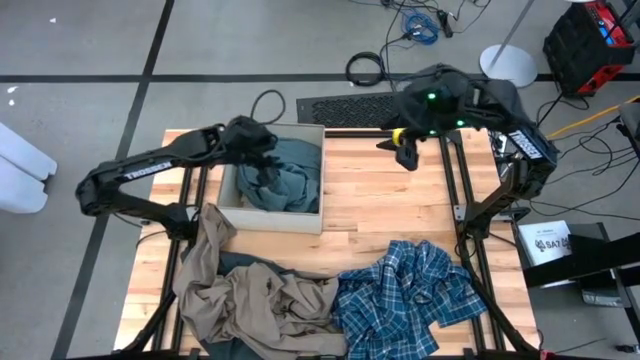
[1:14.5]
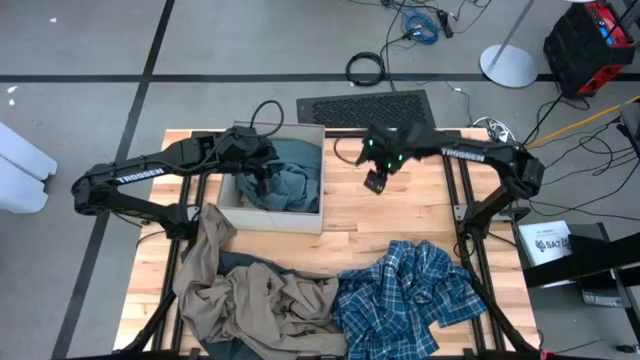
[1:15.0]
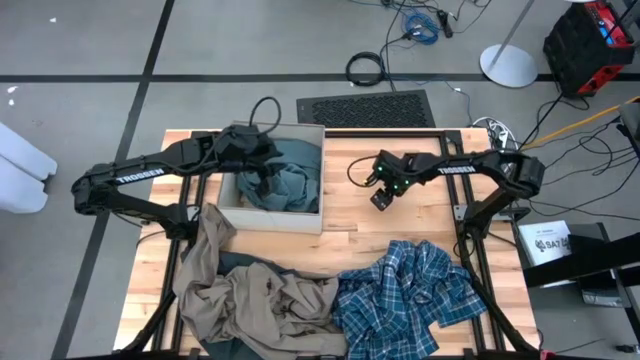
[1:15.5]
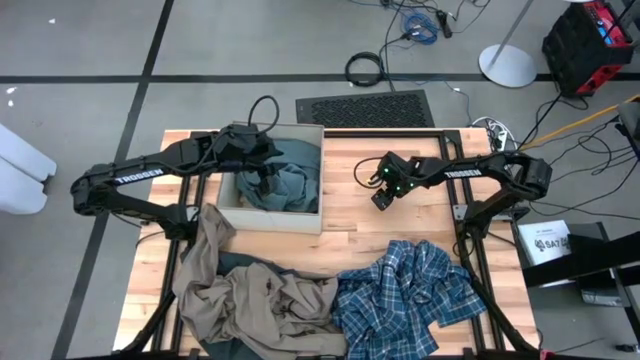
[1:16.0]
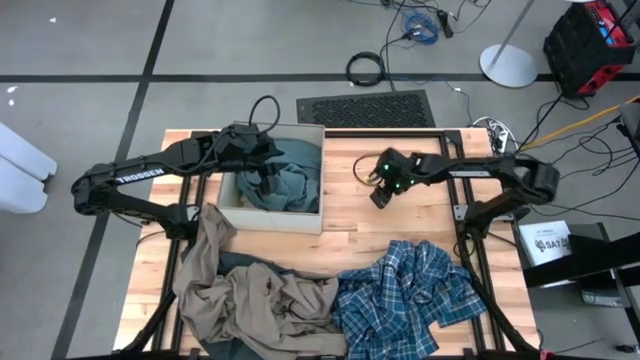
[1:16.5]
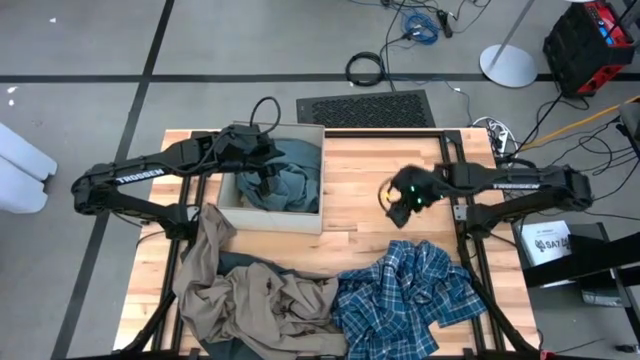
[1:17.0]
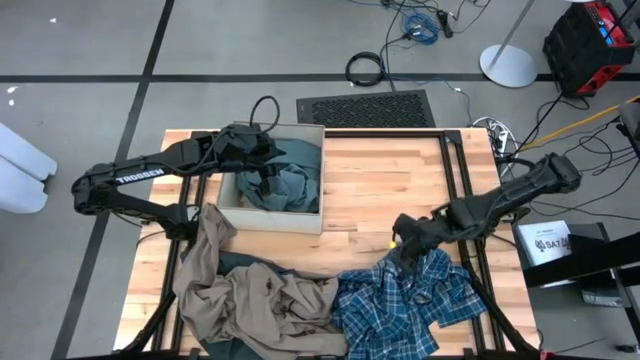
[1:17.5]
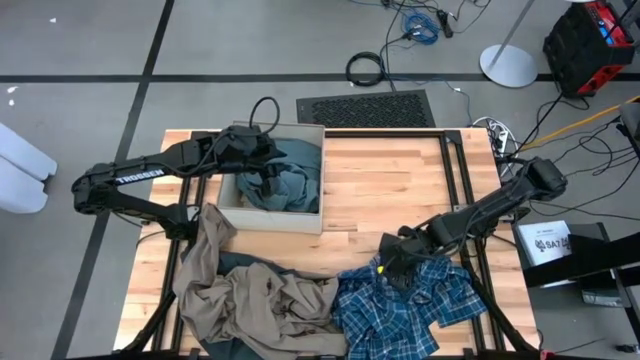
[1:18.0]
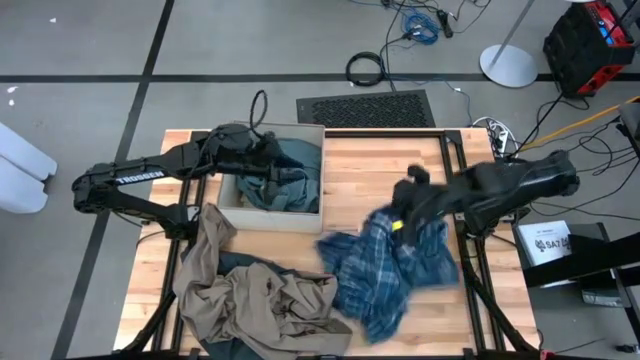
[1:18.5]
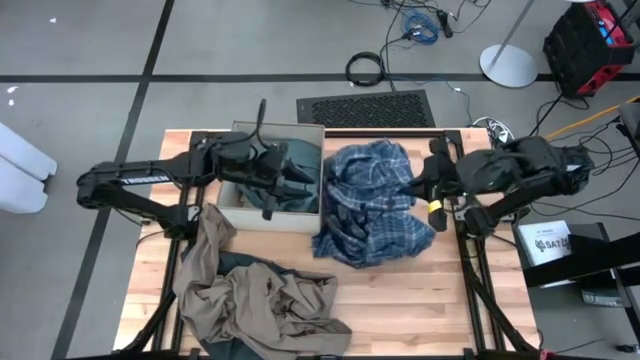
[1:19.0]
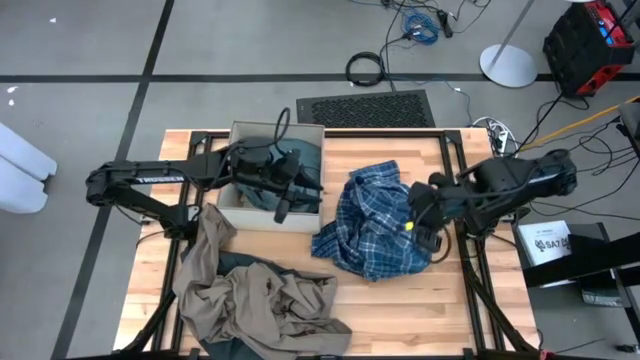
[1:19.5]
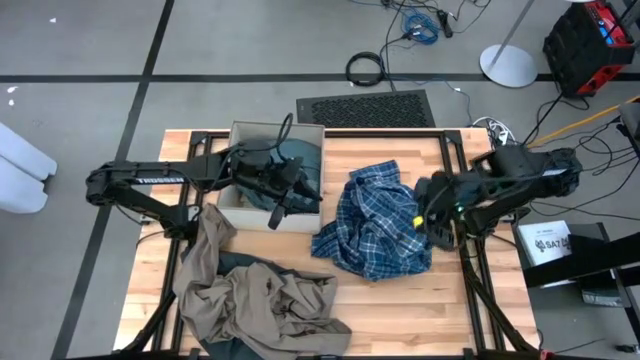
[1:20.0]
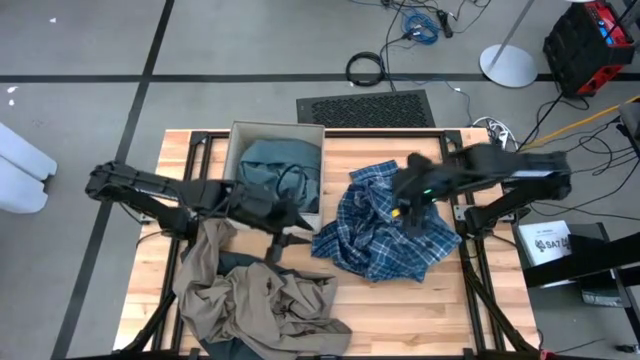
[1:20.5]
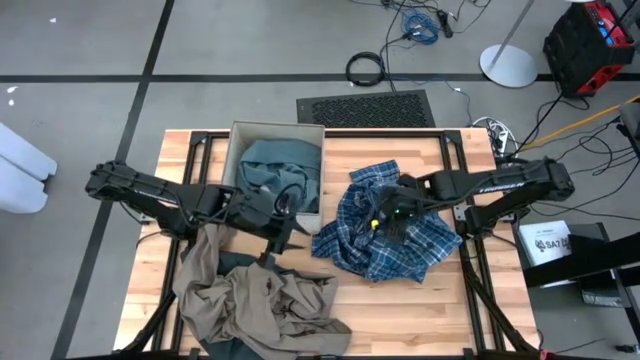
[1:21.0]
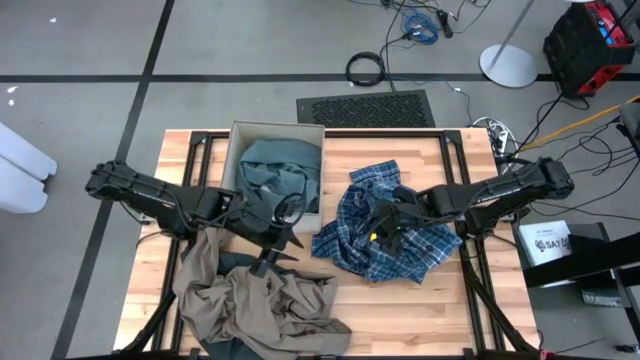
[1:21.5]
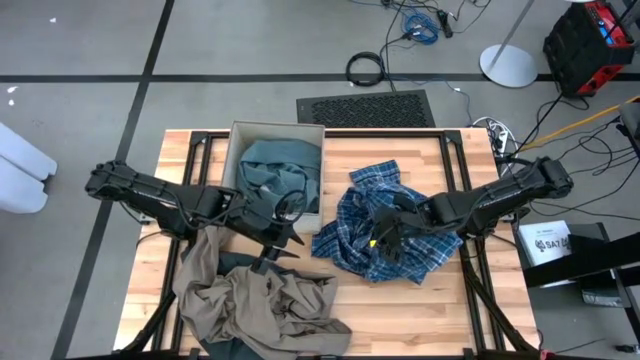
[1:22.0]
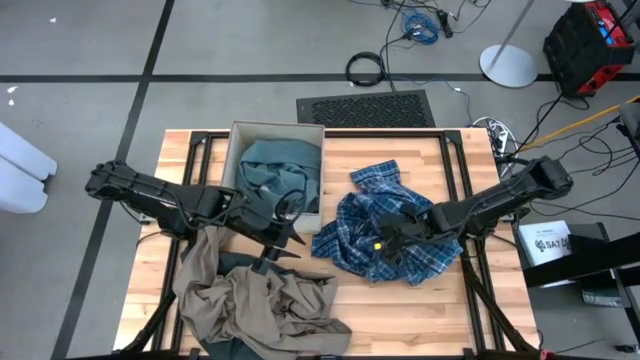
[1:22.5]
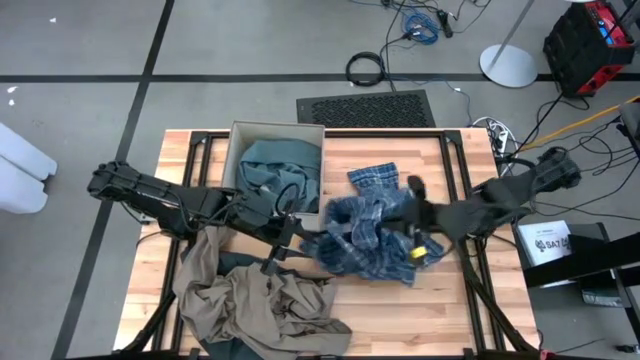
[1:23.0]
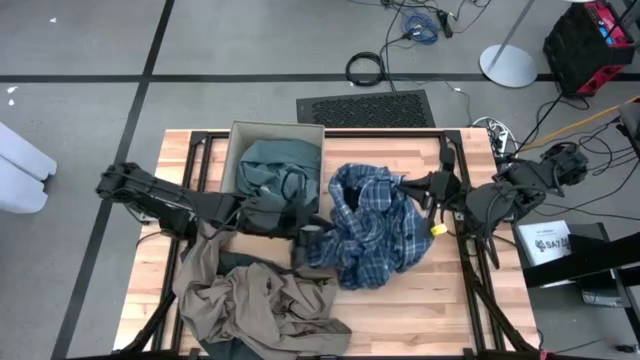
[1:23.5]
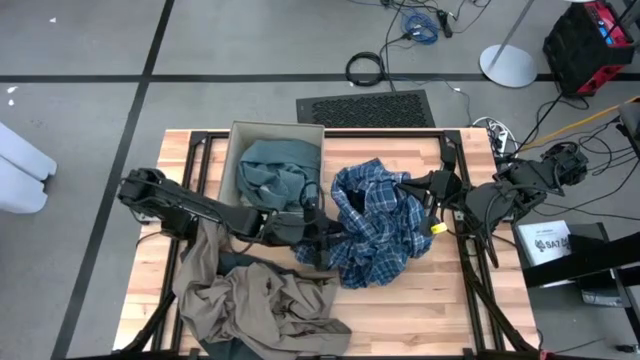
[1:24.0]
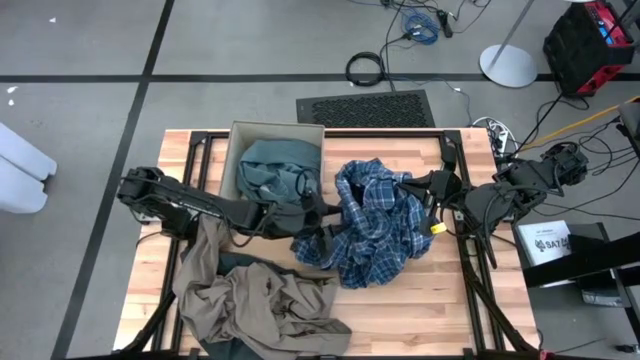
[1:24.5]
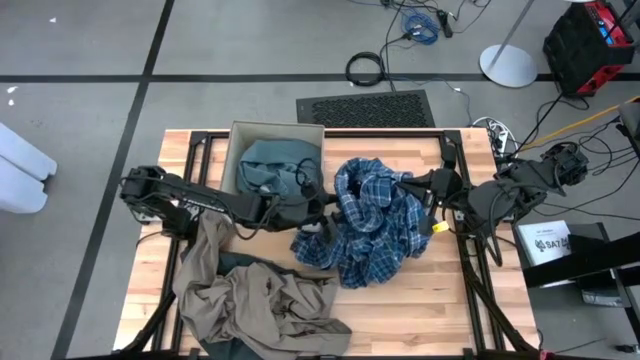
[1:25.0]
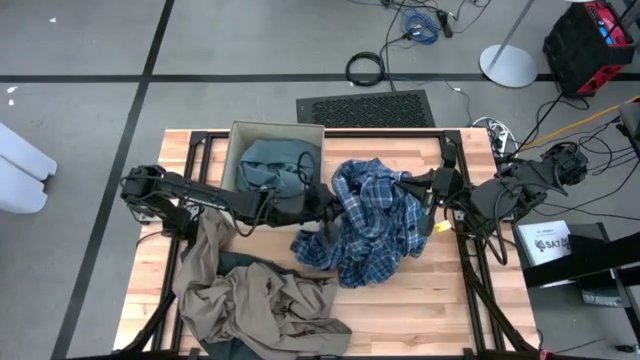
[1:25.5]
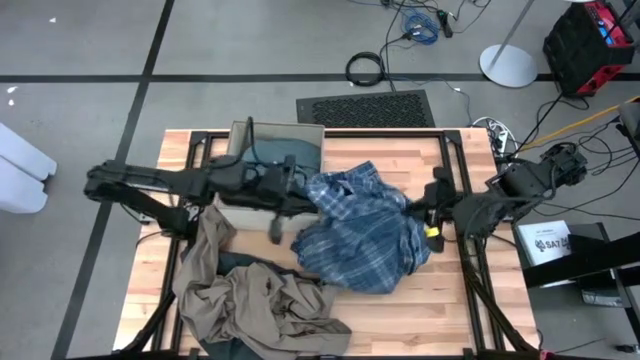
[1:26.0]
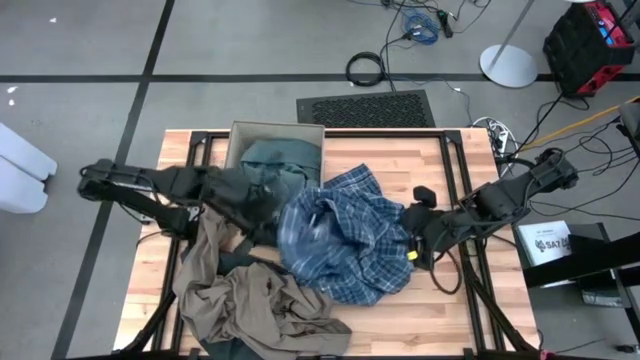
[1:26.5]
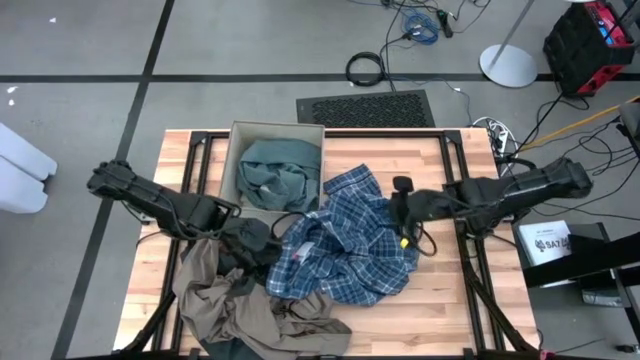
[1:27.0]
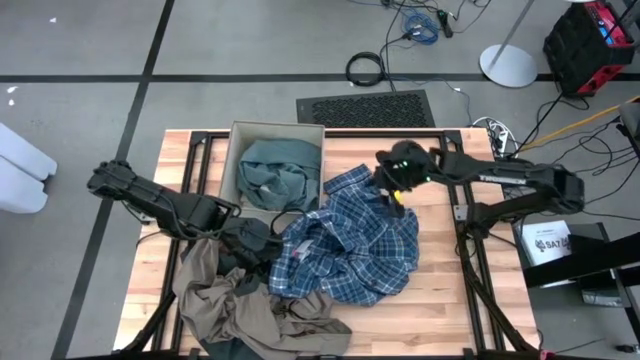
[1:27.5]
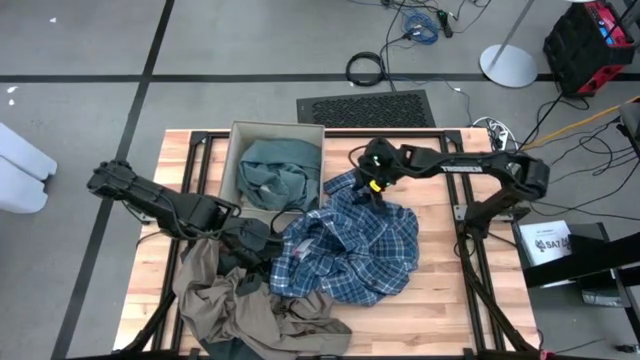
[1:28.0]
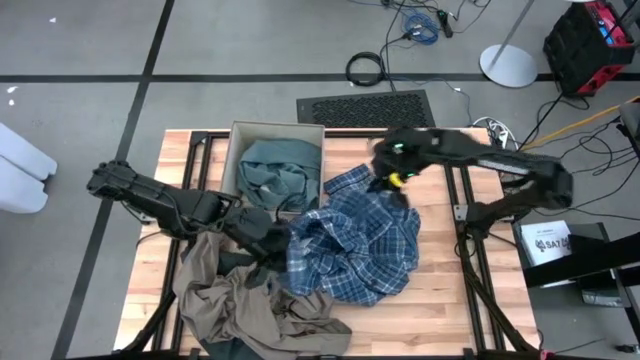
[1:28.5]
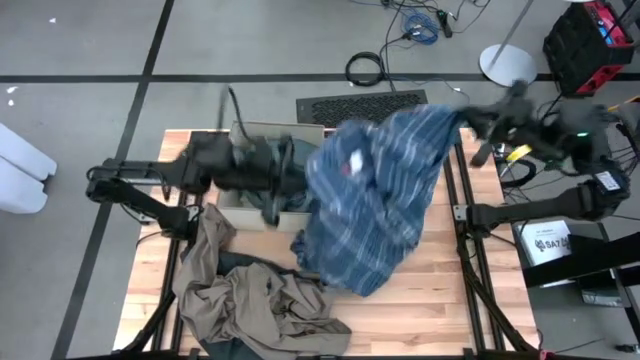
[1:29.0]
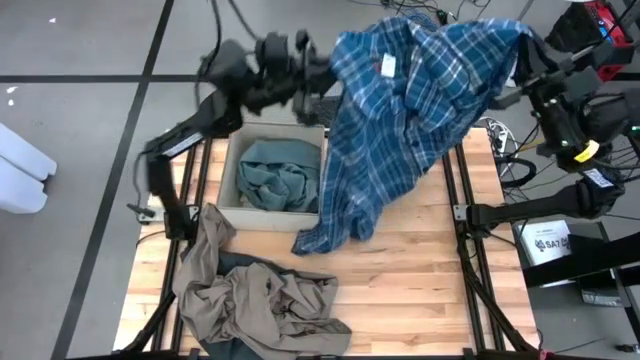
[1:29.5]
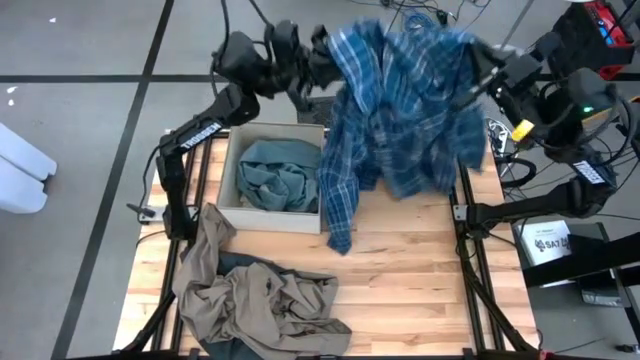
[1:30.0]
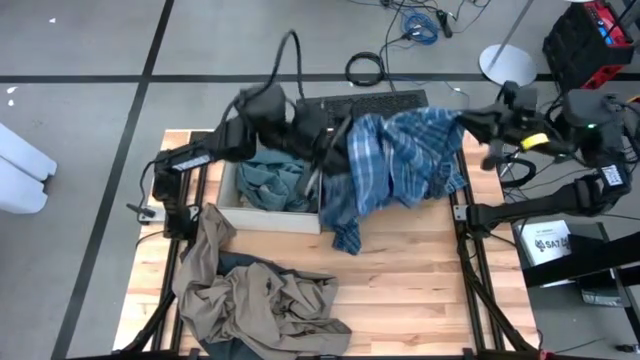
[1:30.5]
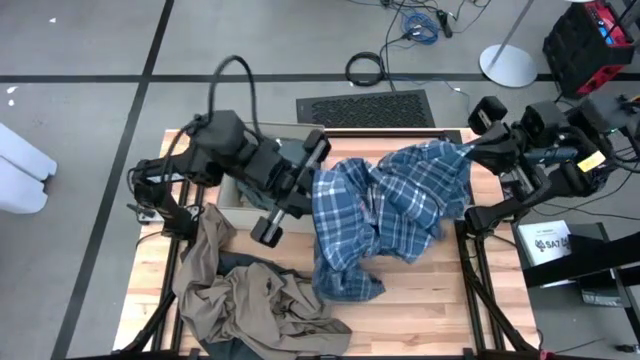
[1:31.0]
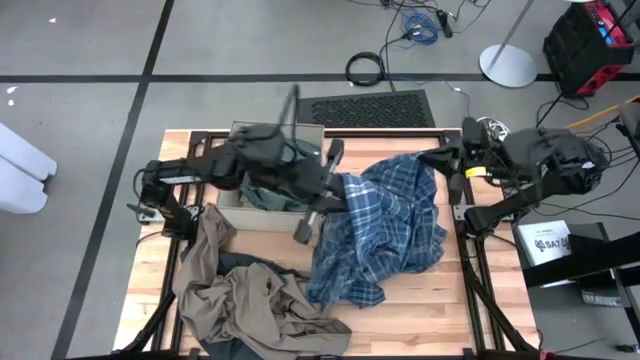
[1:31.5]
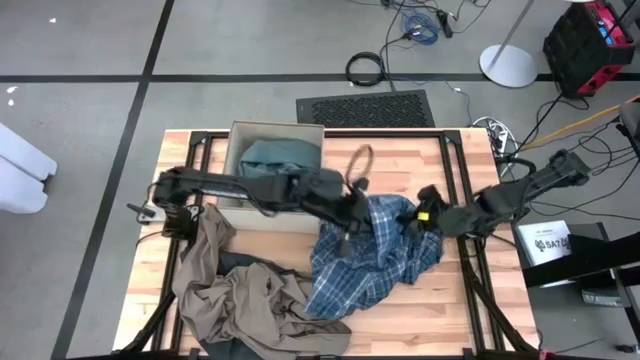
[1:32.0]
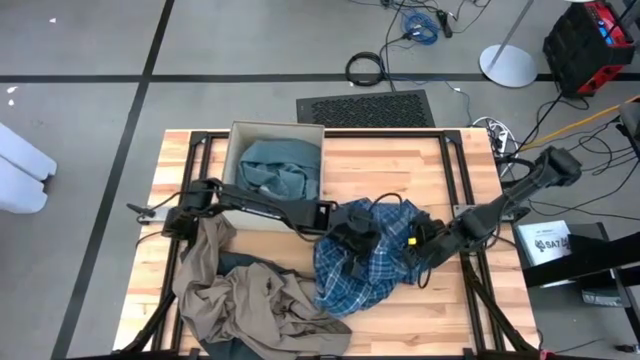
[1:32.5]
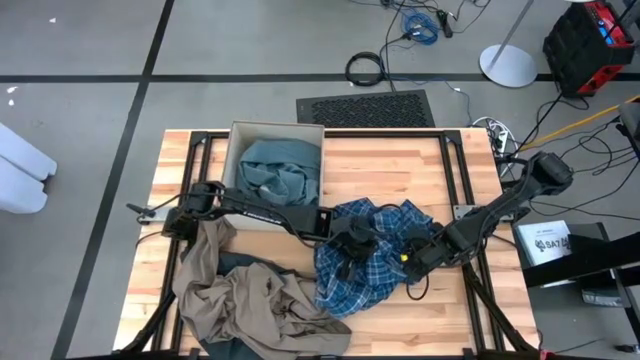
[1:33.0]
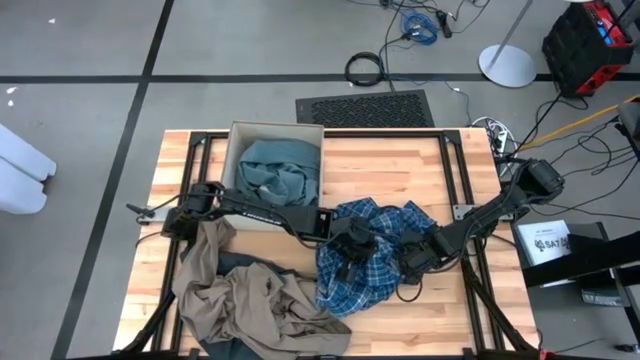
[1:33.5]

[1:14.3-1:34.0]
Task: Sort clothes
Put the blue long sleeve into the white laundry bin
